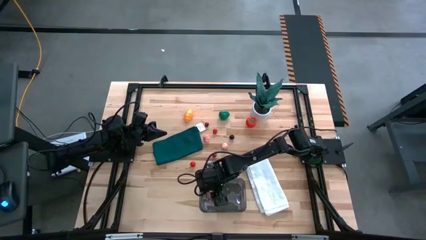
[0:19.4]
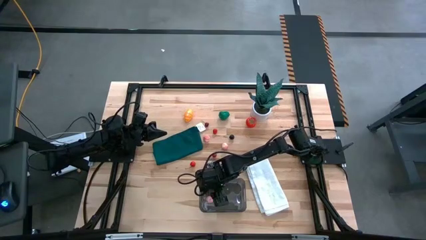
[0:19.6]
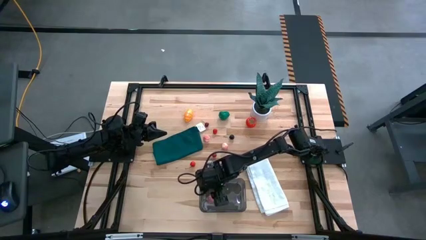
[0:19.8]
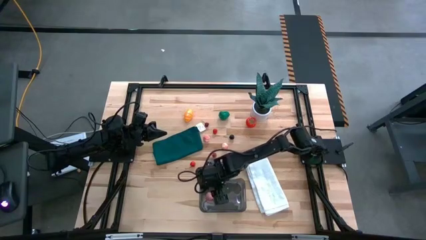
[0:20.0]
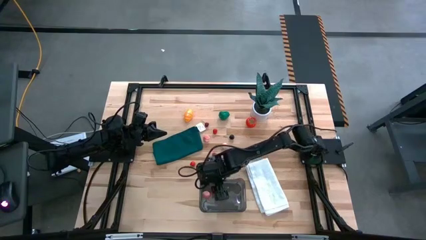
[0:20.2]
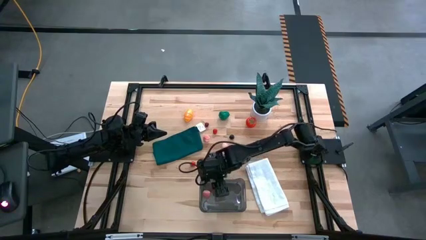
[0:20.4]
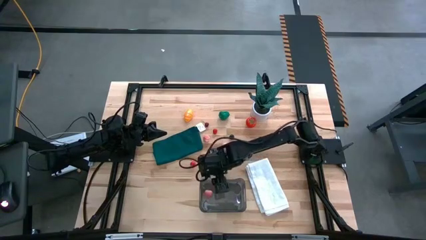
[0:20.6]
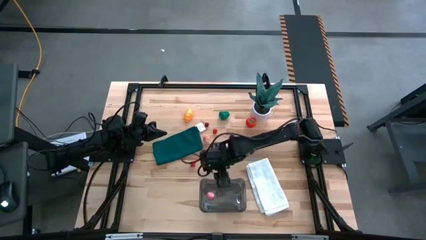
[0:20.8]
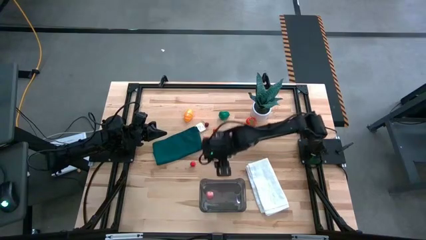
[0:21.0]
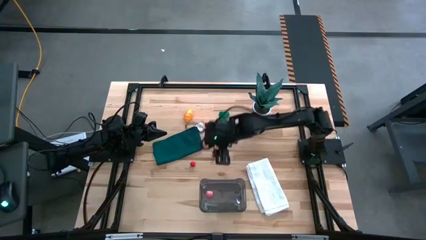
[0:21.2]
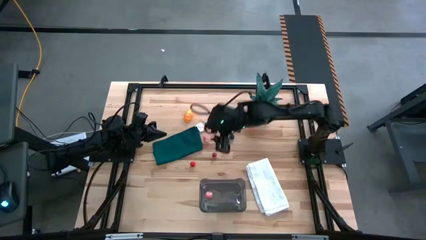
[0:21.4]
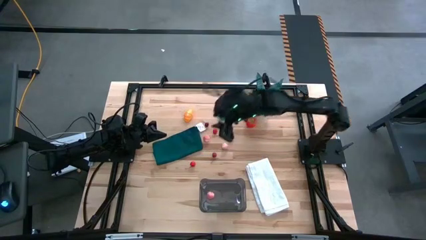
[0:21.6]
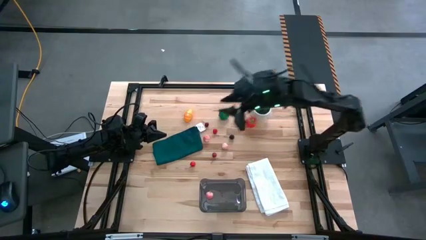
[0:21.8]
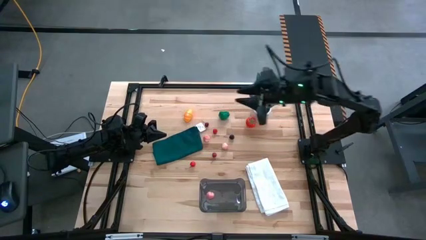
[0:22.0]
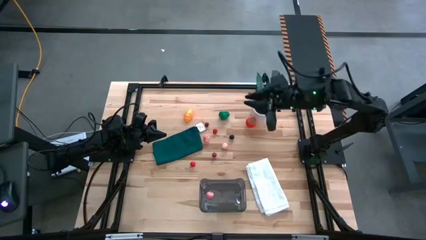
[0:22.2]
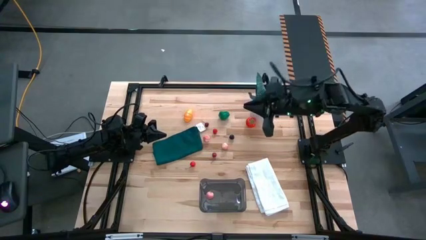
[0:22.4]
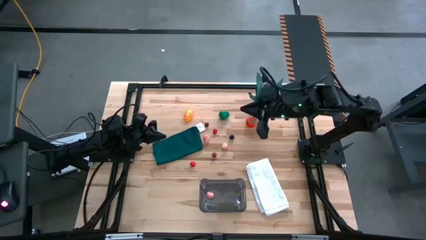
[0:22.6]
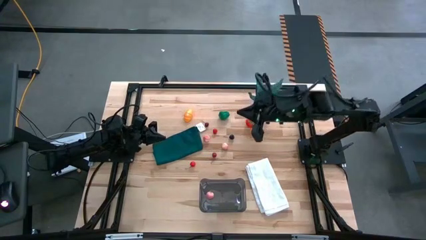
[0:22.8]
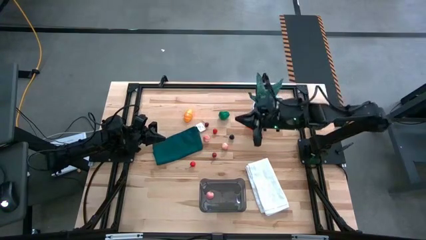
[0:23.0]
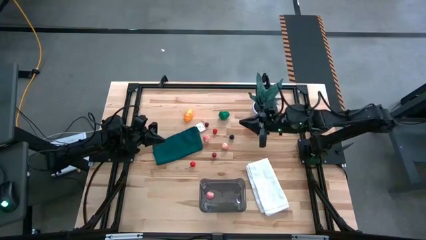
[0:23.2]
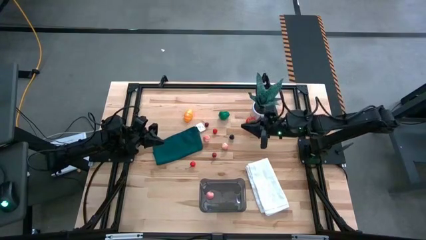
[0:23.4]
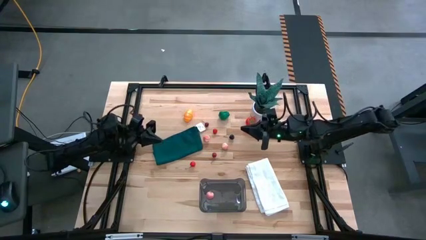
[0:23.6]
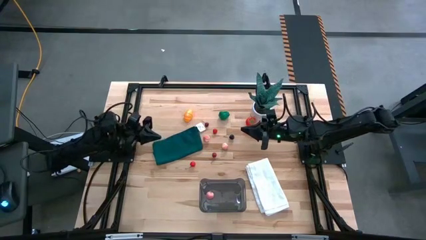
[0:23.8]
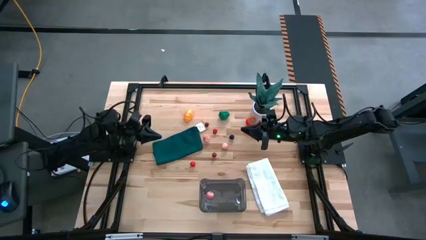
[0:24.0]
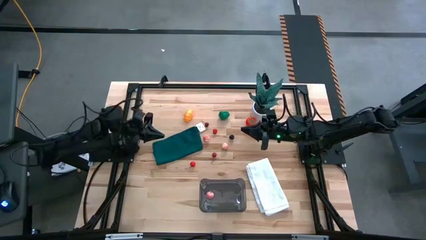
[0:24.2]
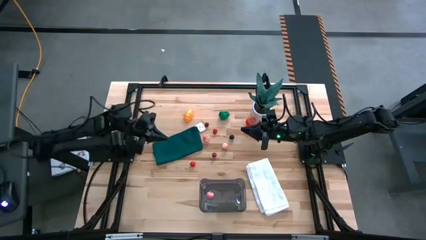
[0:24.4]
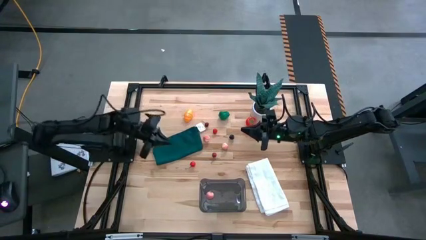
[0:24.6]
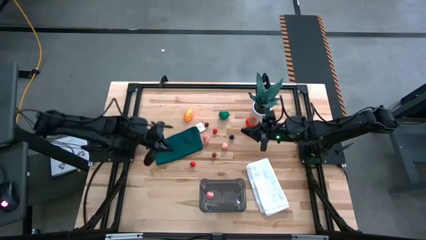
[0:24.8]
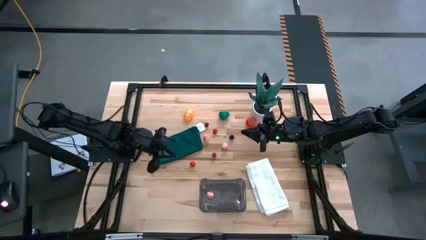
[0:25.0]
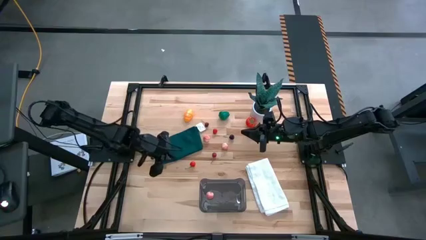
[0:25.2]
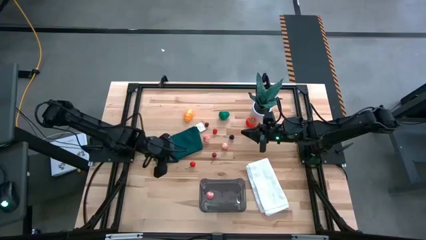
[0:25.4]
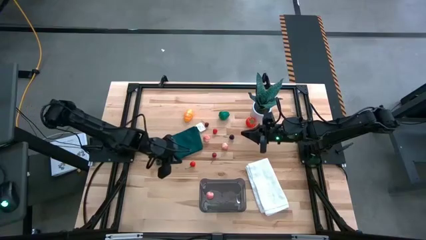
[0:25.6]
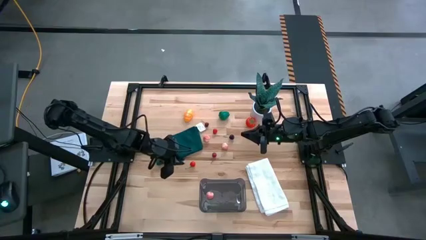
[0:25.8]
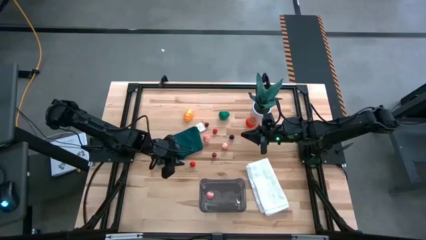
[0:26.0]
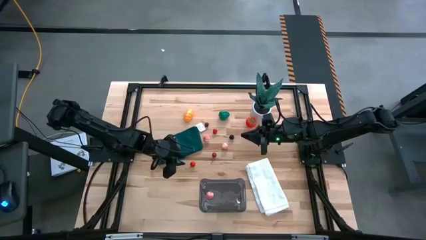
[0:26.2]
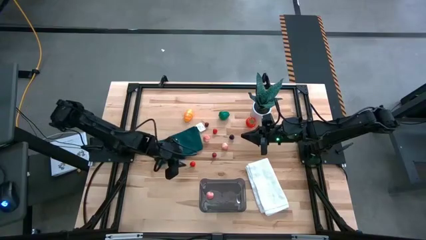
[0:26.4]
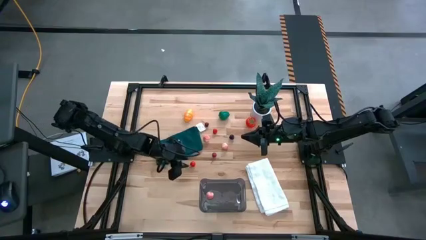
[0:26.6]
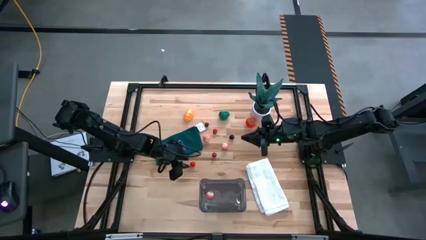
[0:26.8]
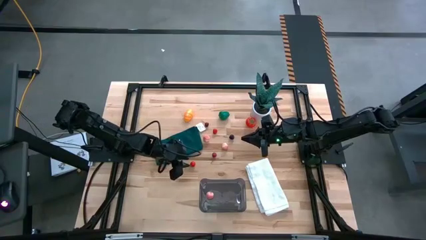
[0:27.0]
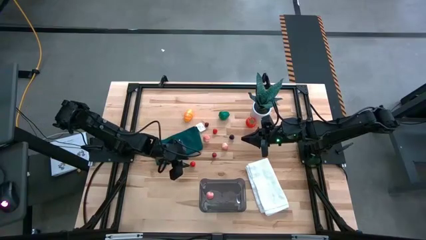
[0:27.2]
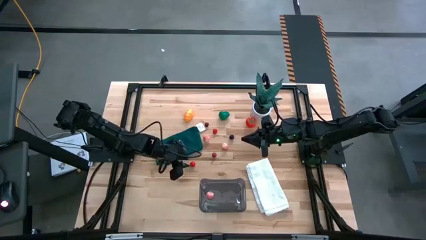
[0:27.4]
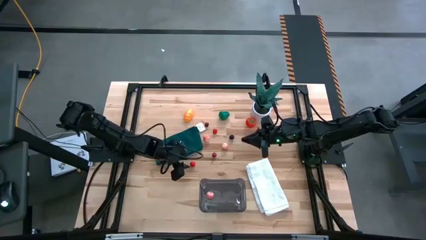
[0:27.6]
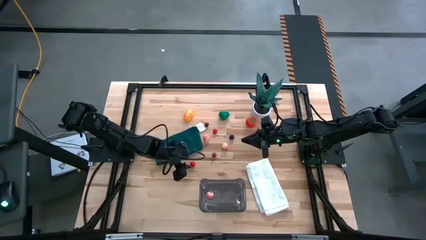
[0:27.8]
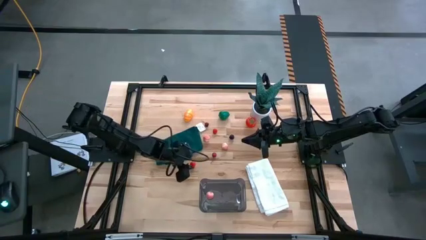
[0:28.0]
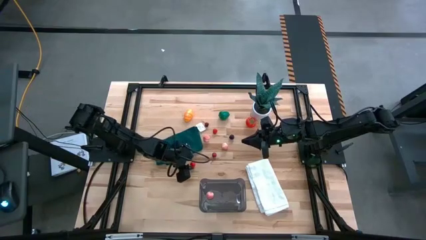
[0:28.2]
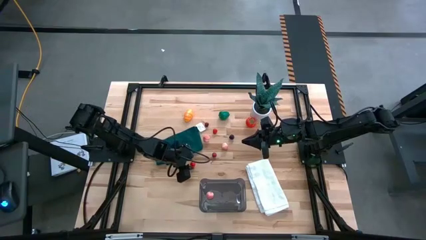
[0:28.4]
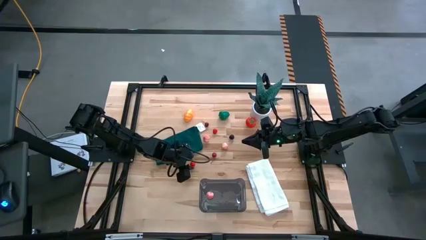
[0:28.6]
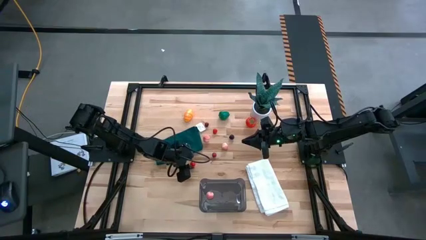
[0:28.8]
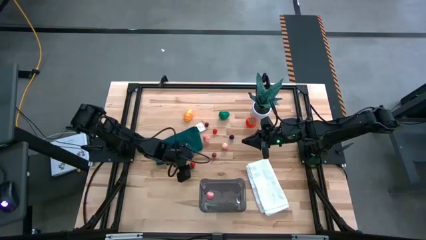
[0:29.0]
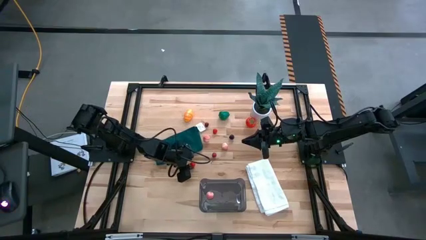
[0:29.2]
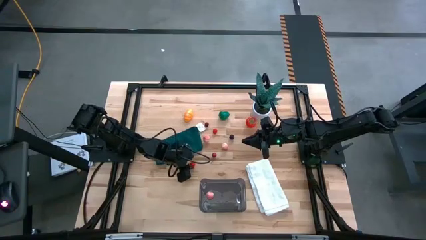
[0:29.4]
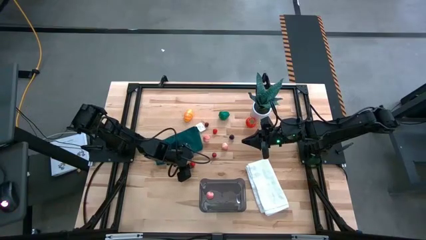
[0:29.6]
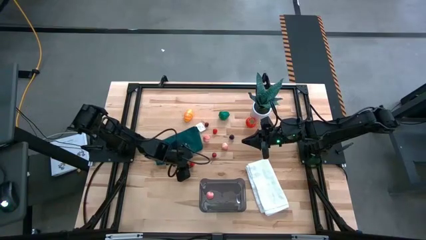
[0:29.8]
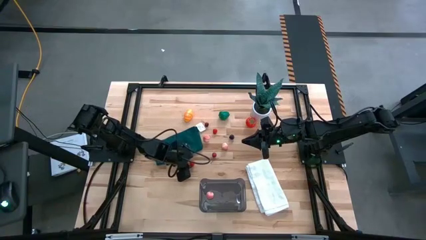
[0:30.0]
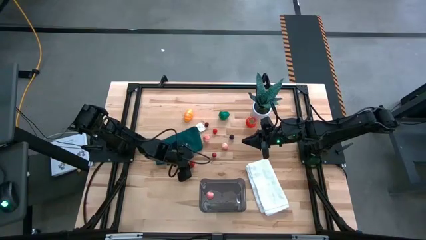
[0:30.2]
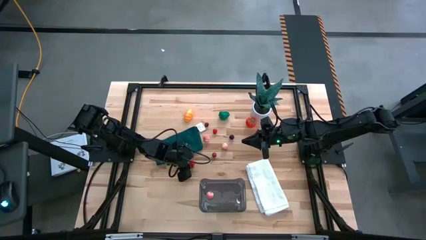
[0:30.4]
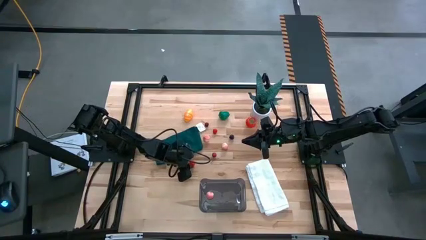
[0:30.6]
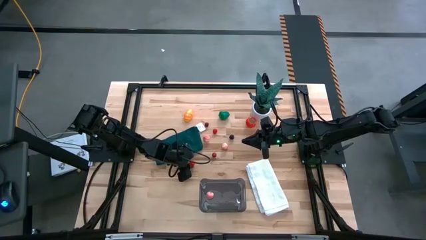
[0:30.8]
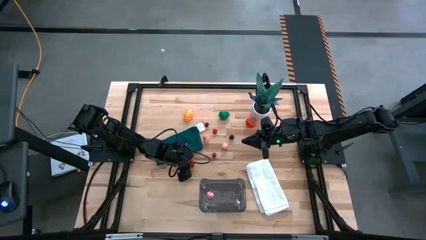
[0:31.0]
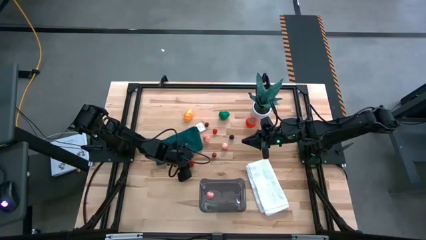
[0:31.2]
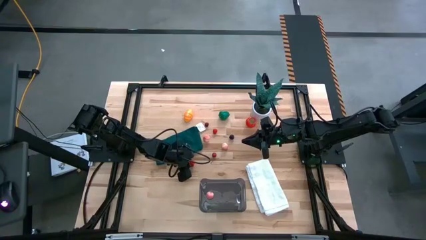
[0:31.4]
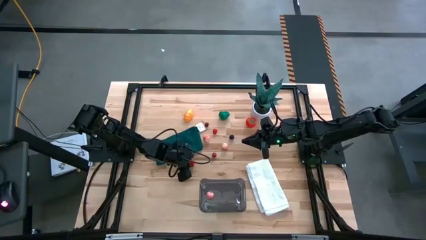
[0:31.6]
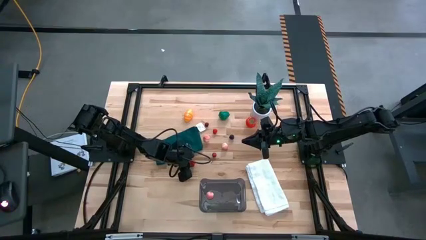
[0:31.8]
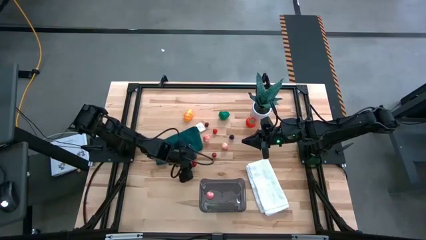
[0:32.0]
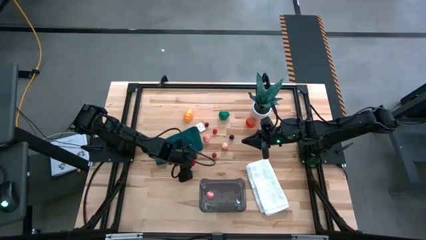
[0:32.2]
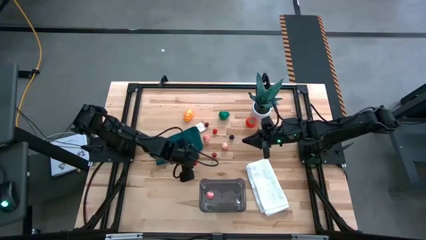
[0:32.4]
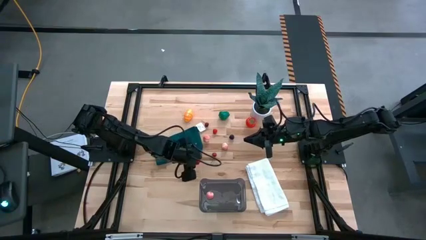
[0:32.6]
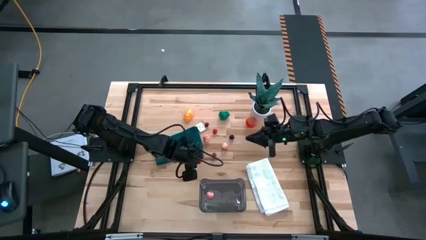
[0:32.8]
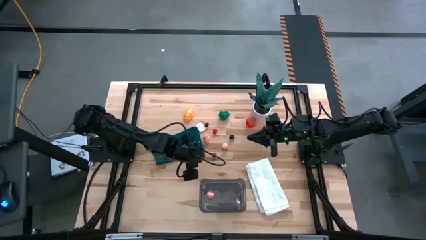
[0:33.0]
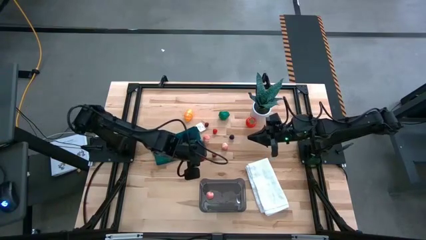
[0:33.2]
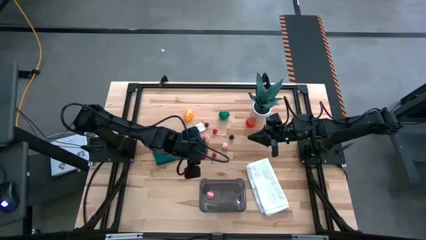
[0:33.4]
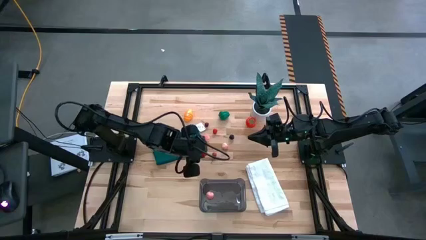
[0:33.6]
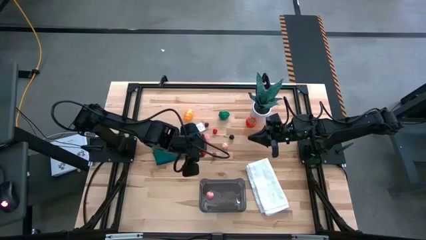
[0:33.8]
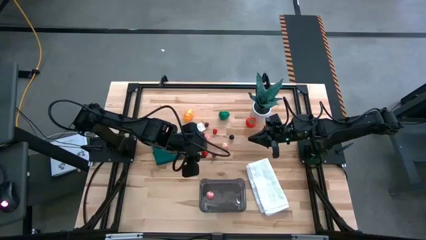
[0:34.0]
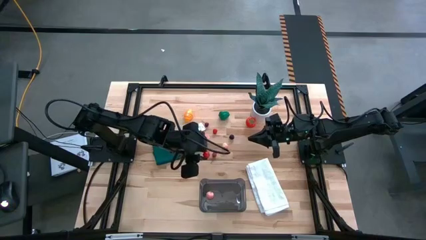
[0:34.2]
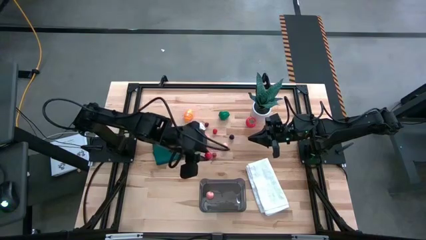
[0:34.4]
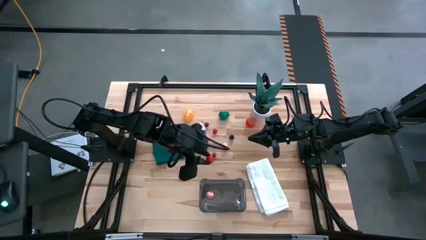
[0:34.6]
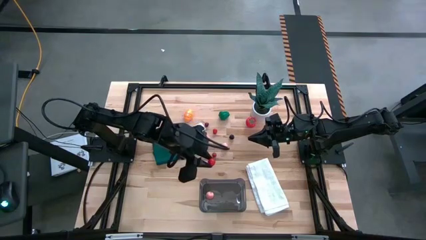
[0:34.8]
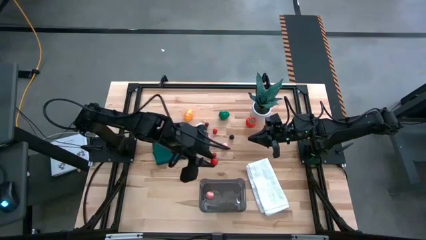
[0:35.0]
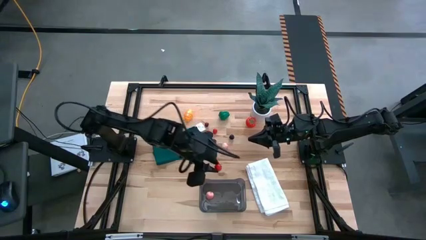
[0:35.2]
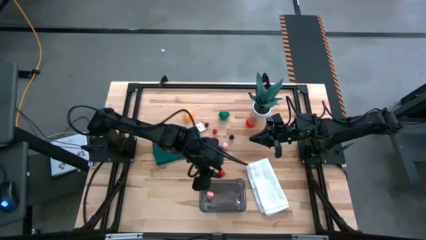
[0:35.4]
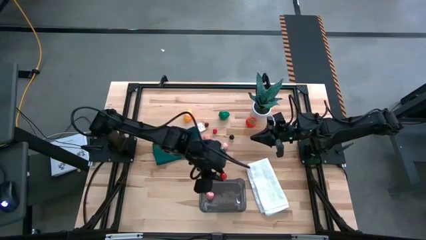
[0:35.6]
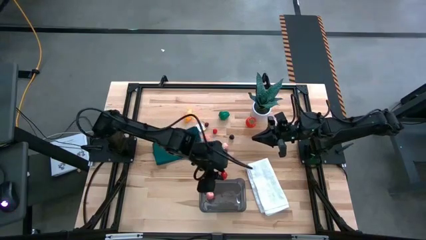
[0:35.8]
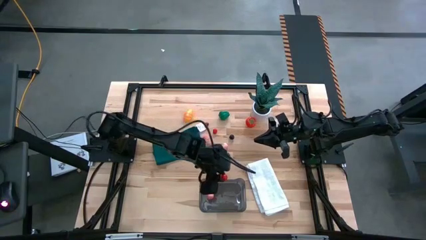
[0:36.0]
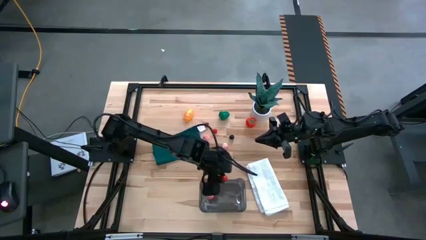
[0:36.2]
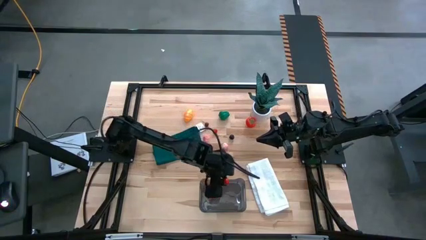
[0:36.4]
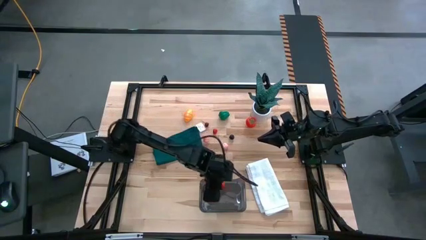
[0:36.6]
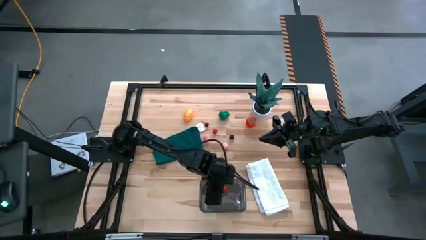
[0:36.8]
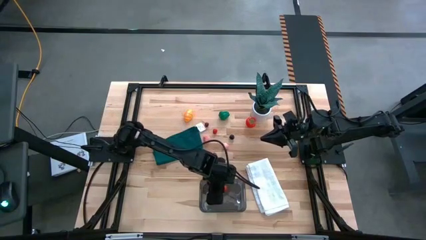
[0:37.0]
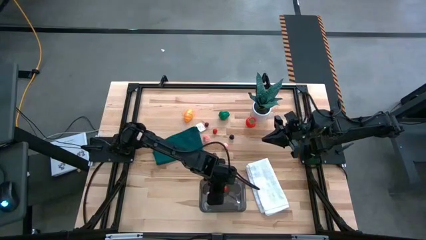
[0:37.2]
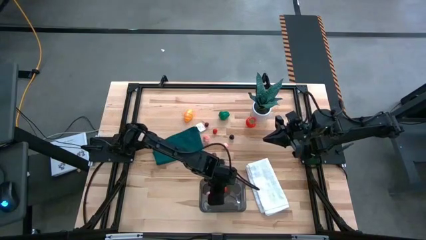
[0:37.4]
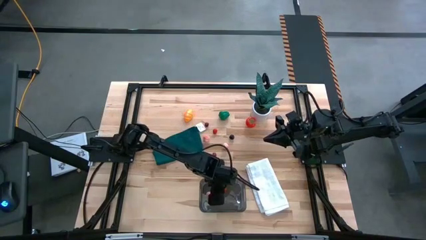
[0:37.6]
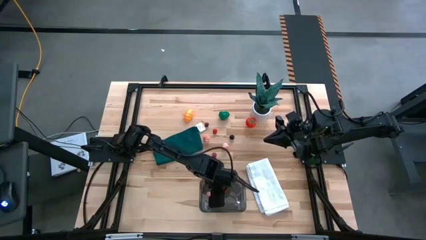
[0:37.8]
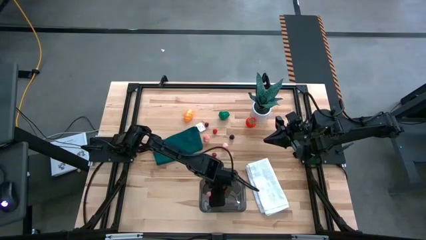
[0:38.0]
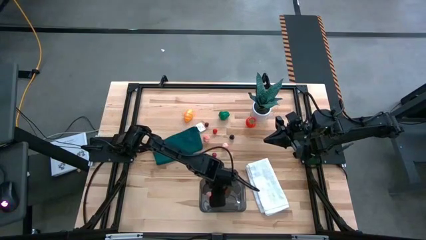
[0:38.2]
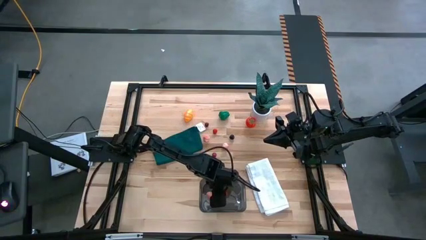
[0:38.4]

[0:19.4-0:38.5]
Task: Pick and placing Produce into tupperware
Put the bottom red cherry into the black bin
